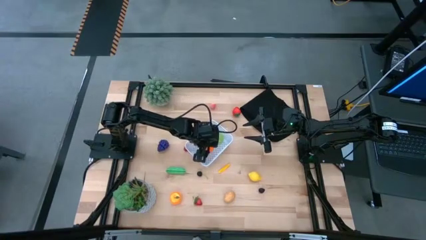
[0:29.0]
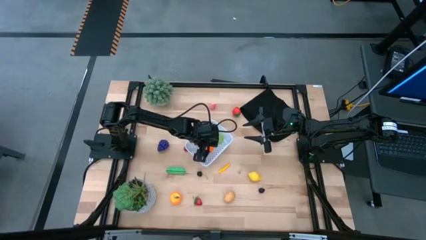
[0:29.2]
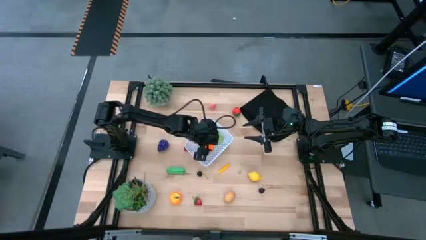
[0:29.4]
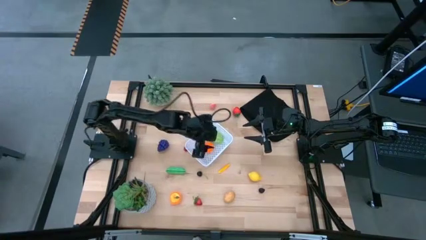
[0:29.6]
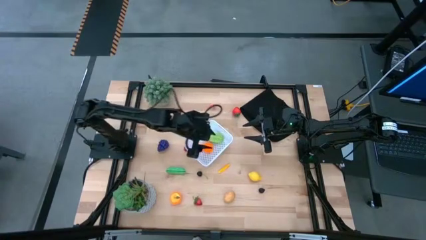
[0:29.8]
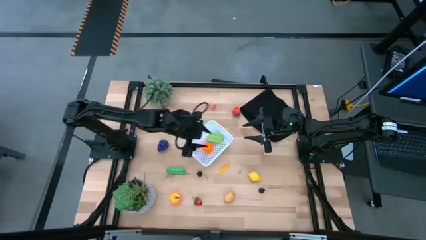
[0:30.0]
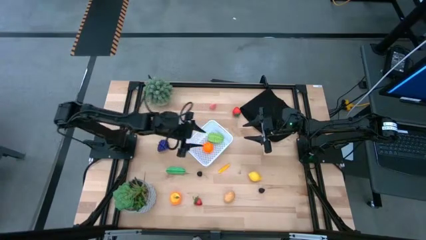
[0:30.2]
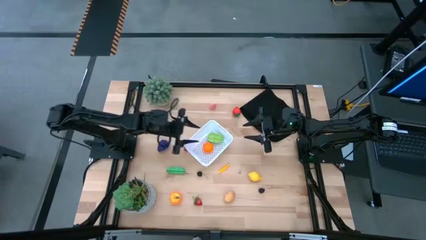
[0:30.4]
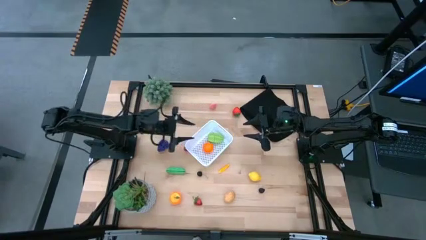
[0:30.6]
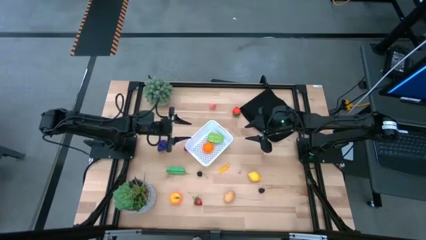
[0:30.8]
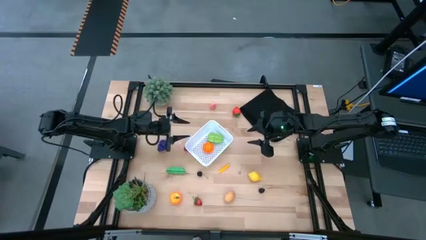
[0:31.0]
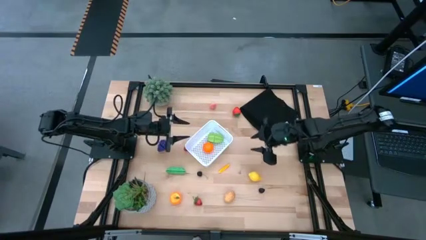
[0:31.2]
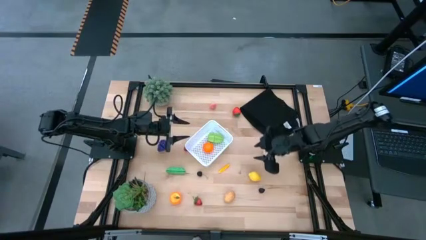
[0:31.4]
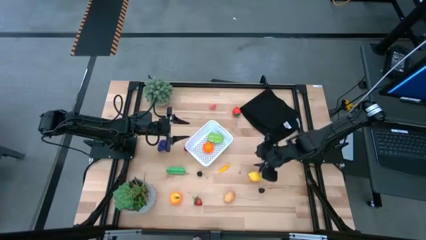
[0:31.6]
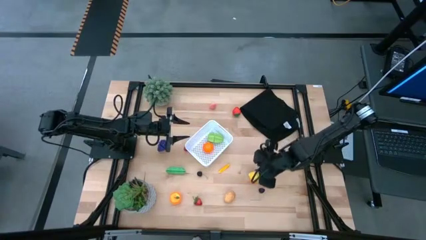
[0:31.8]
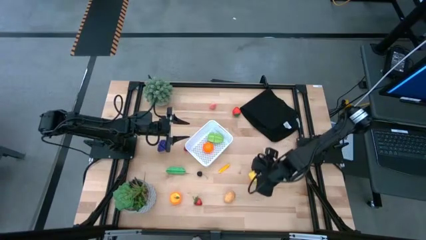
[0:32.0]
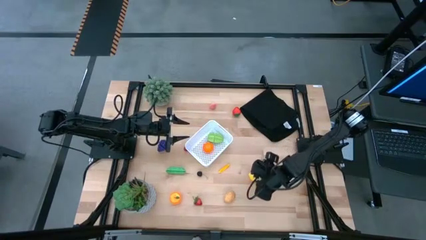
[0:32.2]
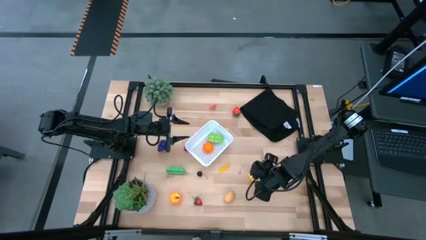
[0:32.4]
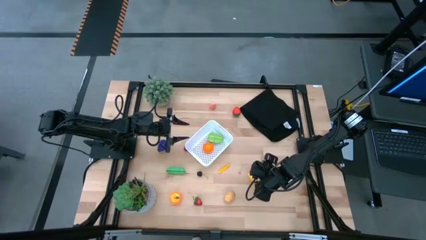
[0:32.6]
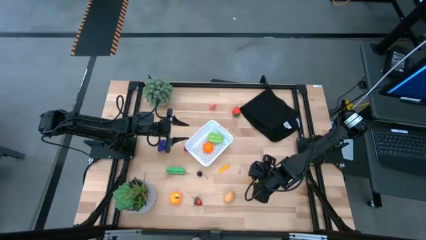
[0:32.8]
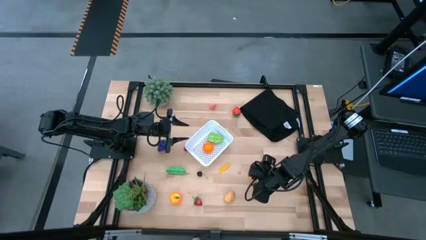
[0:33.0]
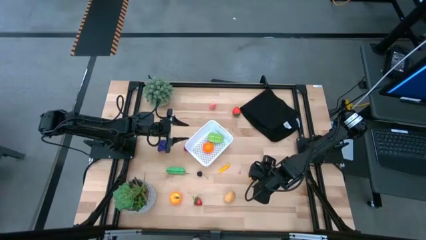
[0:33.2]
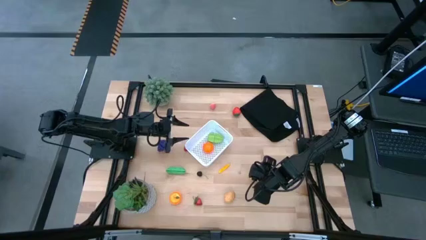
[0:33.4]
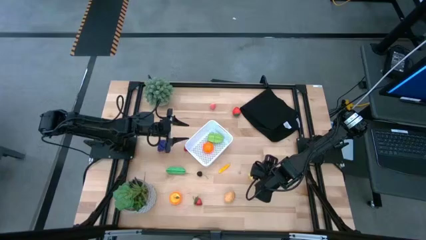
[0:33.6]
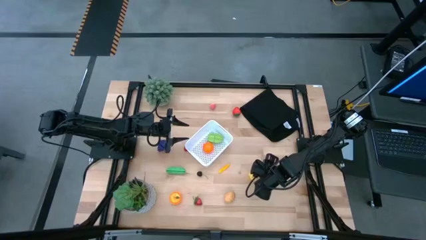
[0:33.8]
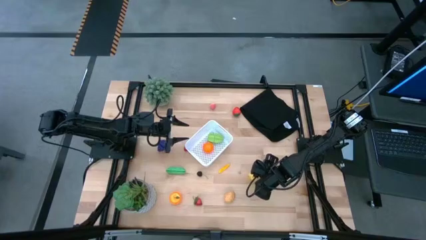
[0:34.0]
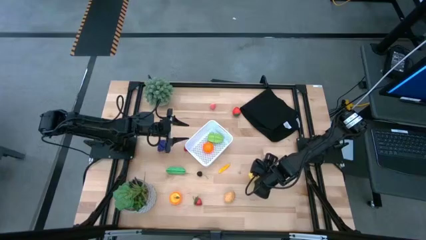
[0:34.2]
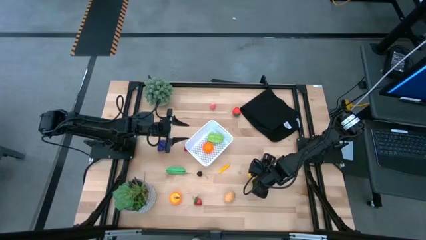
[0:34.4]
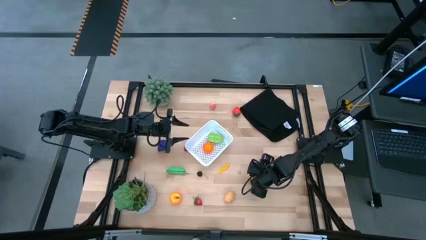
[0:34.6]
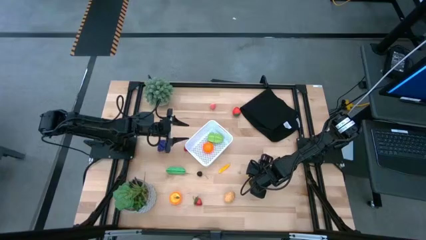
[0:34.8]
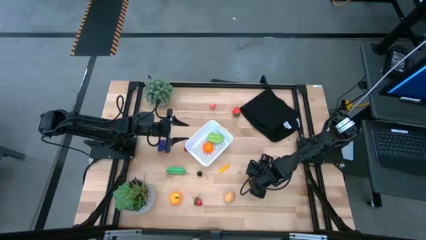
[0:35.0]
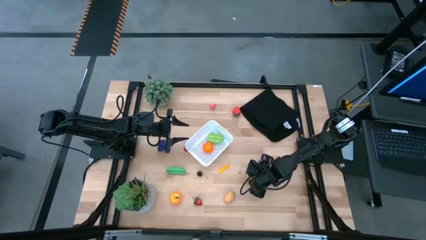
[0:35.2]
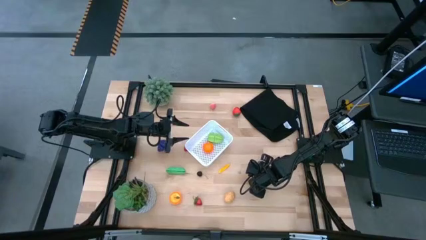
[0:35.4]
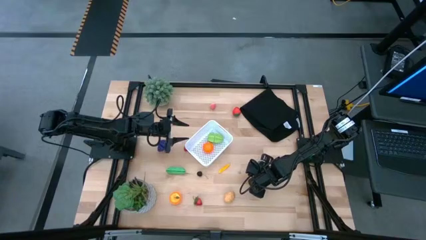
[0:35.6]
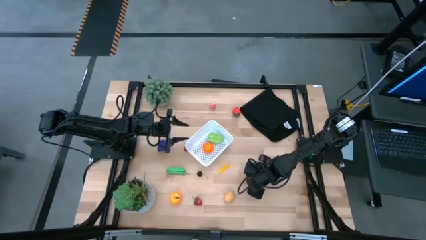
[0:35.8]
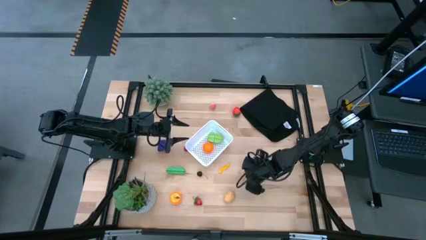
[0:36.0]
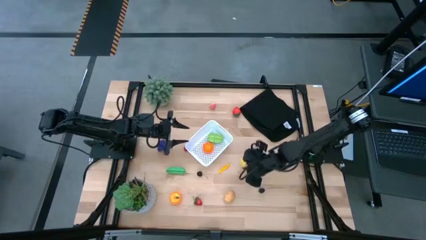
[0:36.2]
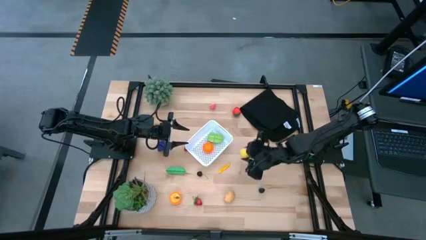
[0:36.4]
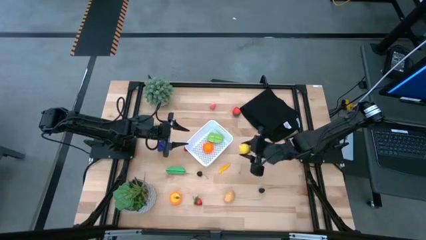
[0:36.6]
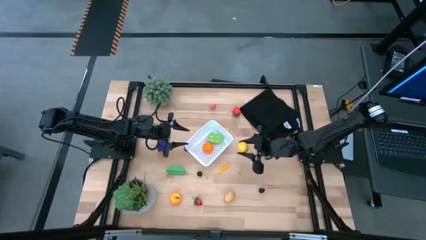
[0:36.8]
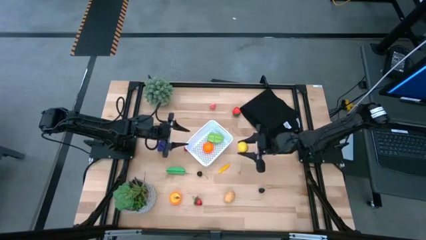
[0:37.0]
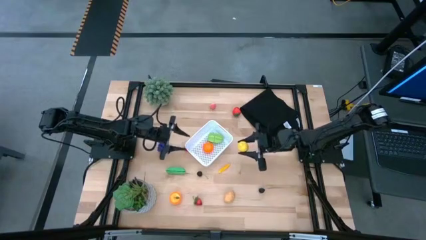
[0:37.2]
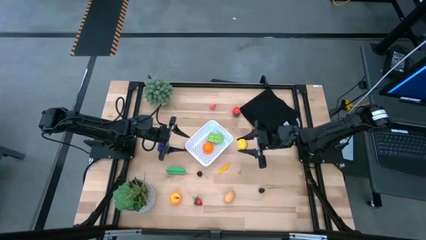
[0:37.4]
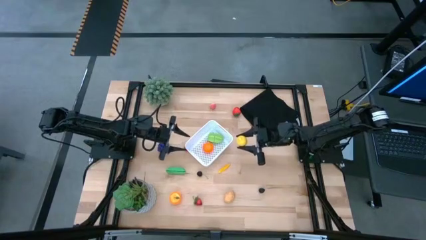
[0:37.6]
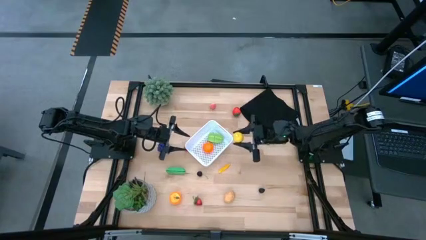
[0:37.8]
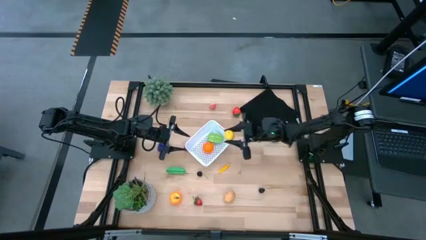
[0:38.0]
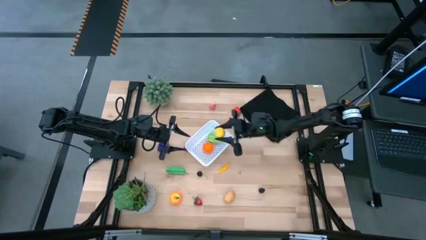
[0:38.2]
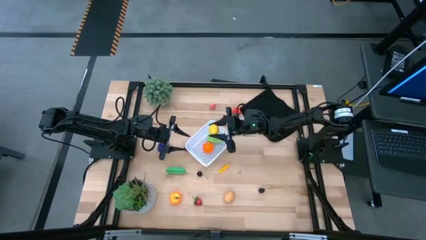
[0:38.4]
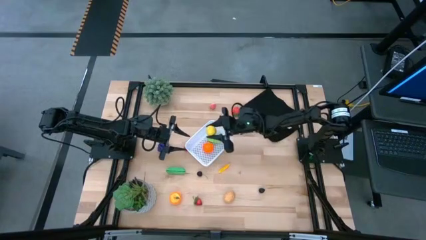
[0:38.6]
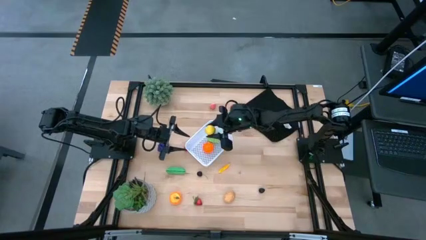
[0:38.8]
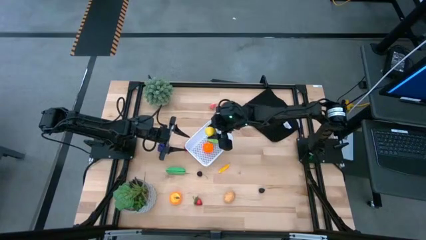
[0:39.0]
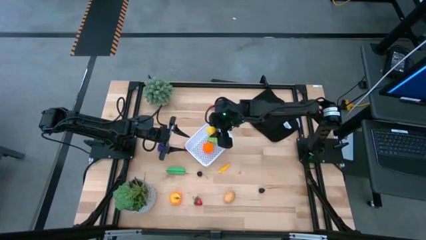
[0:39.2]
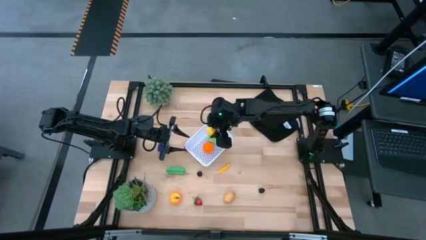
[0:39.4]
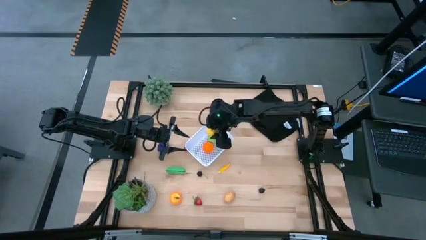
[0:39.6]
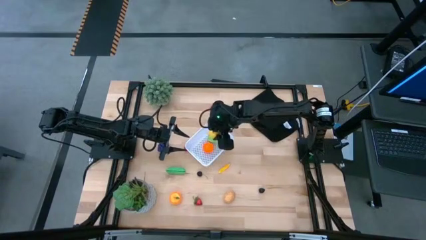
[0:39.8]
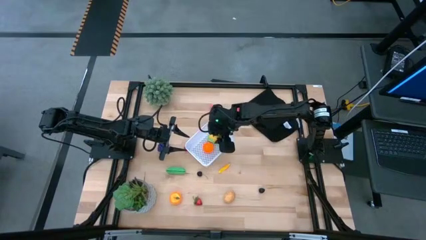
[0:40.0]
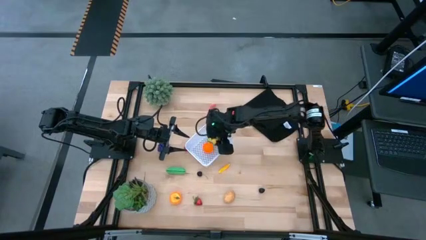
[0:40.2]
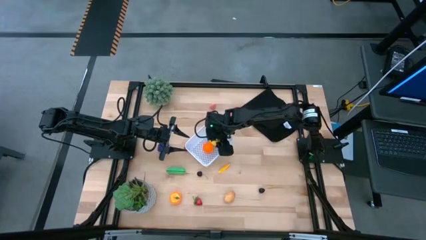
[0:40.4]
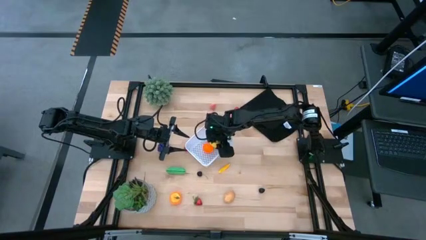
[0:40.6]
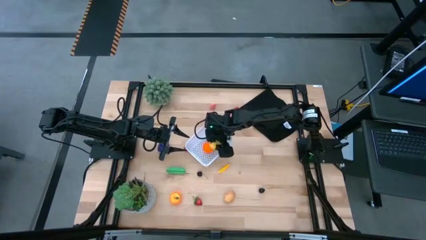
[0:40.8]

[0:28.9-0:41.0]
Task: Pick and placing Produce into tupperware
Put the lemon into the white bin

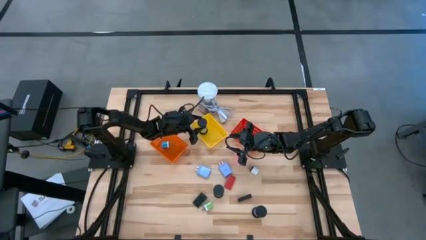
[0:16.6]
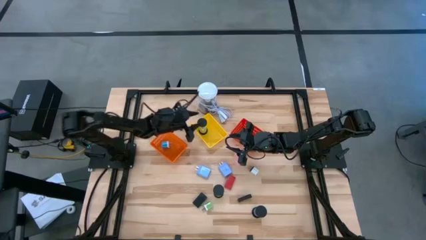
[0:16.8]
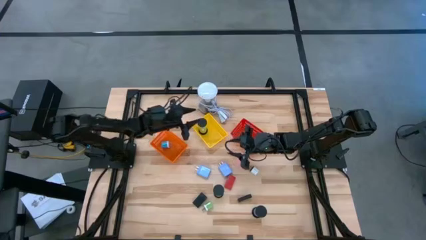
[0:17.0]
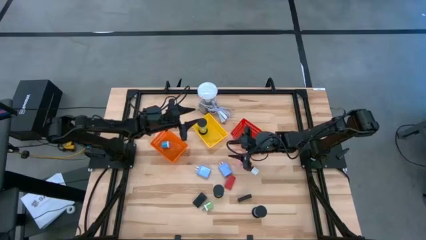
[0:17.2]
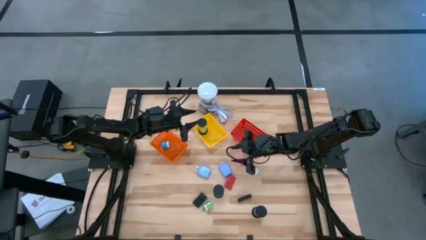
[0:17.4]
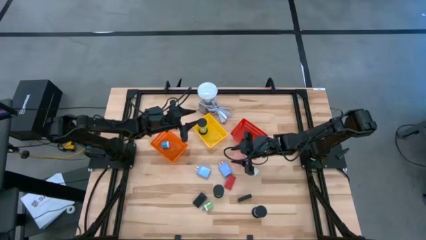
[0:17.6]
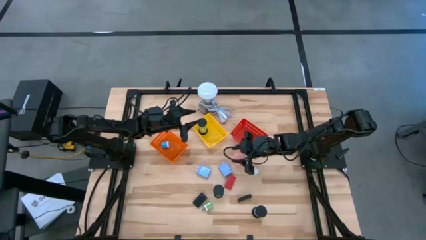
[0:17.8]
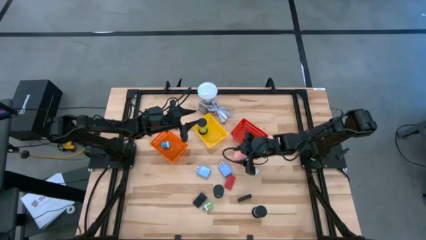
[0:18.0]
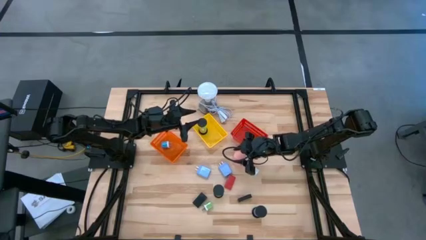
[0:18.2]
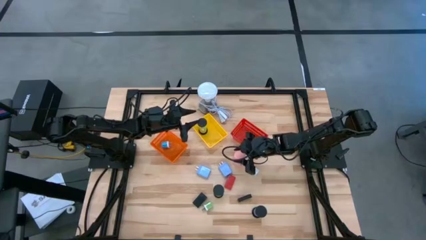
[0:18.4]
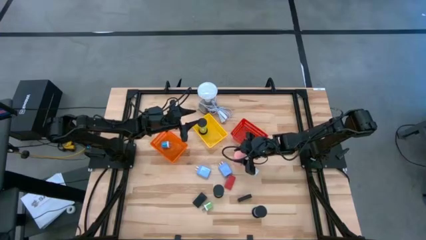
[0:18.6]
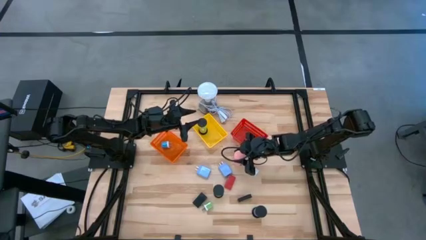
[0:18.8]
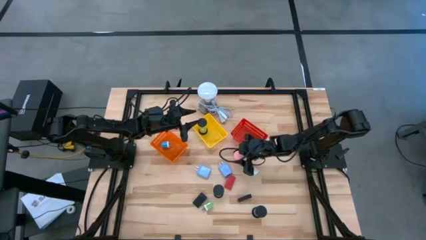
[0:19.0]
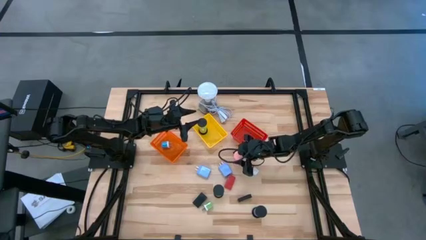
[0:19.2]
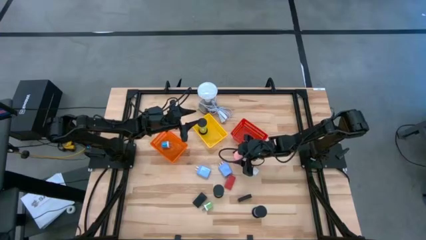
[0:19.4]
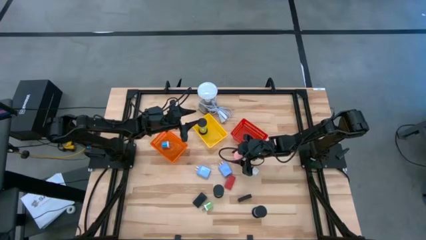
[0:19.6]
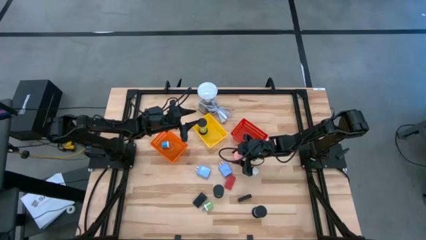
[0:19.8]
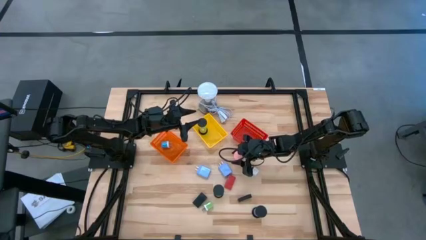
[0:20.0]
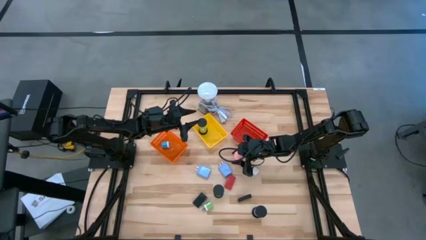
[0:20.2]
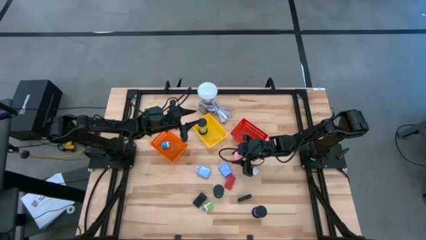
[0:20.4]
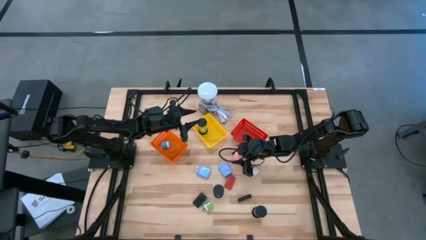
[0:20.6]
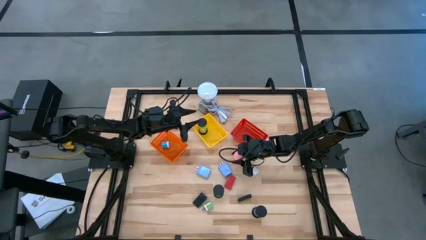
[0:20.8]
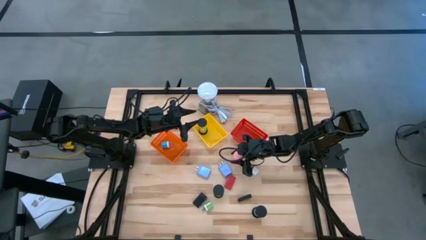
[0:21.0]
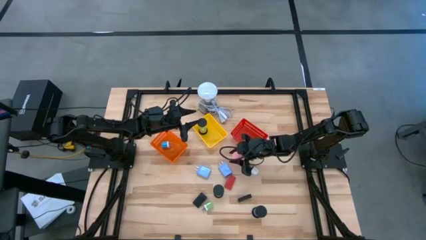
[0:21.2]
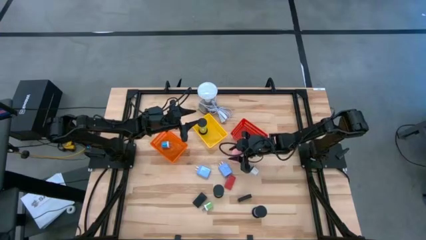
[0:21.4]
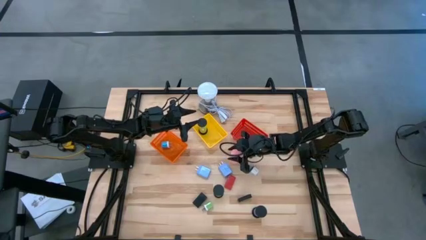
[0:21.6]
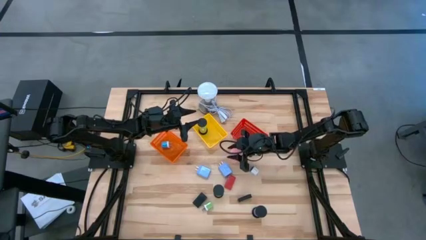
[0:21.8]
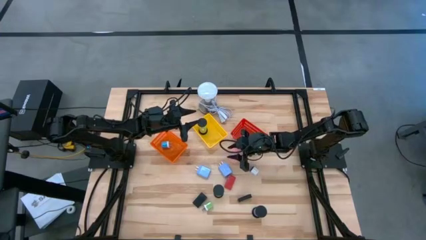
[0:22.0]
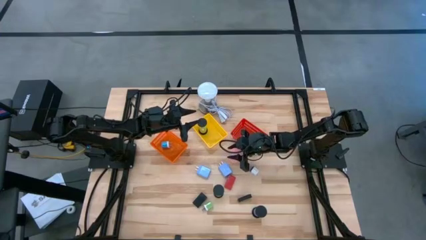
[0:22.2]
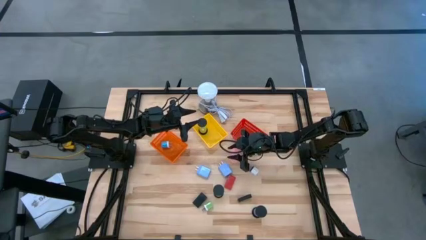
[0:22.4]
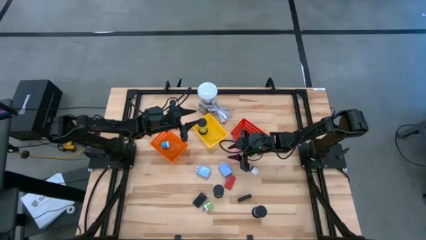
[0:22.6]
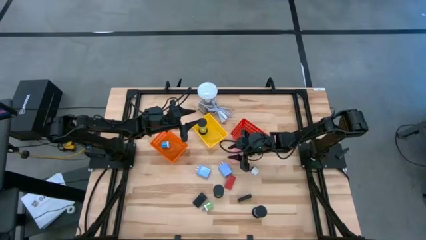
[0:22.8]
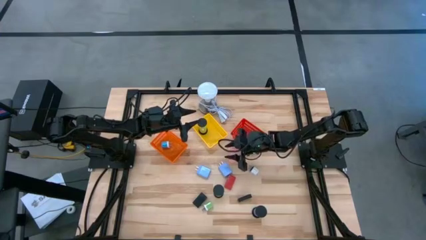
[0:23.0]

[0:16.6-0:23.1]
Task: Pick & Place Office items
Put the pink hourglass into the yellow basket
